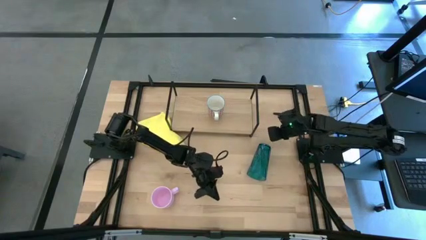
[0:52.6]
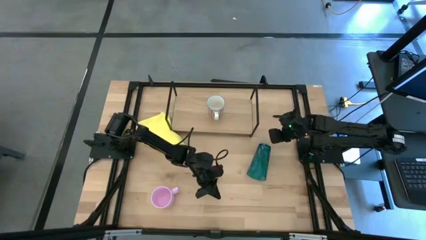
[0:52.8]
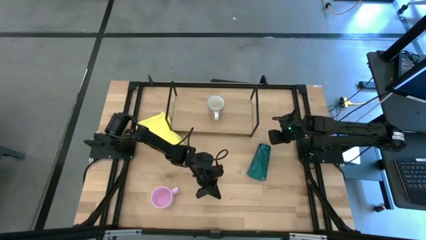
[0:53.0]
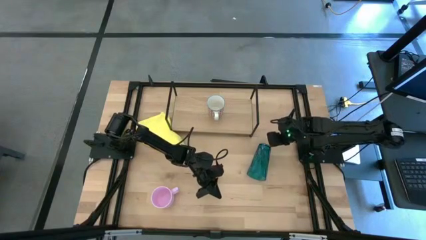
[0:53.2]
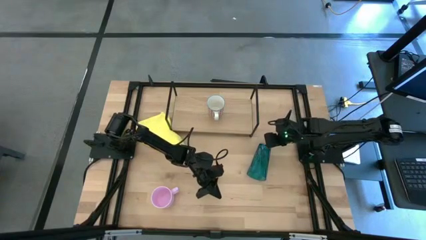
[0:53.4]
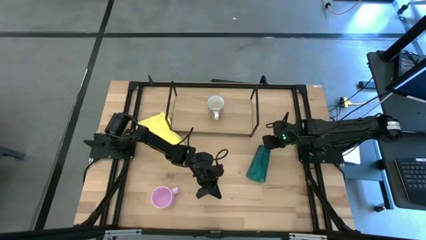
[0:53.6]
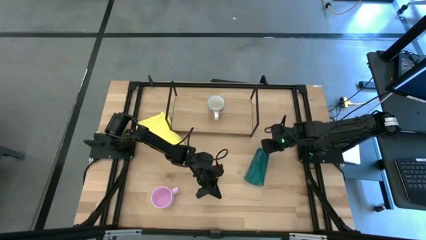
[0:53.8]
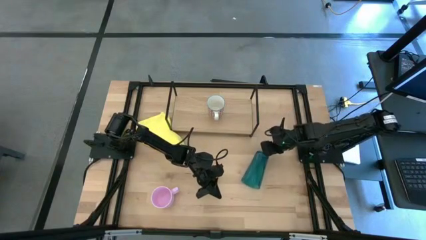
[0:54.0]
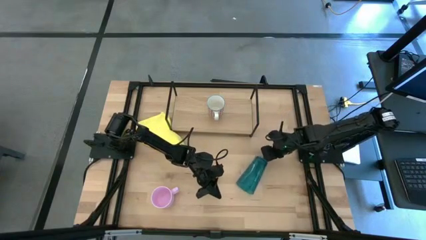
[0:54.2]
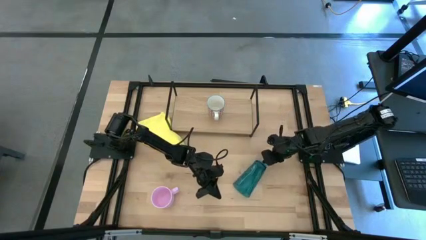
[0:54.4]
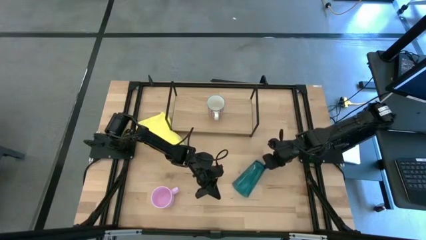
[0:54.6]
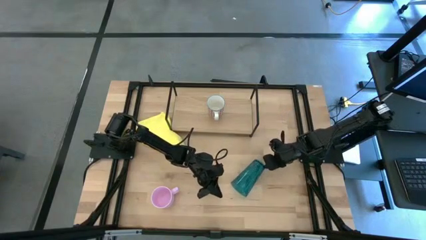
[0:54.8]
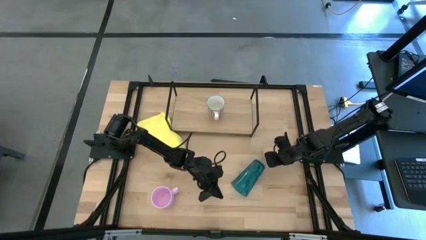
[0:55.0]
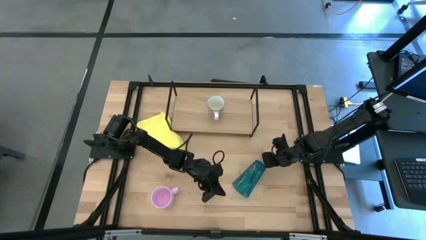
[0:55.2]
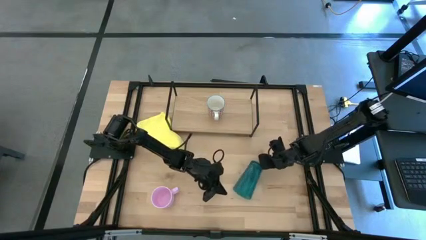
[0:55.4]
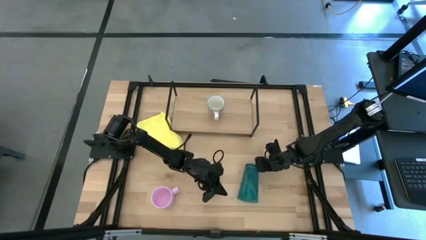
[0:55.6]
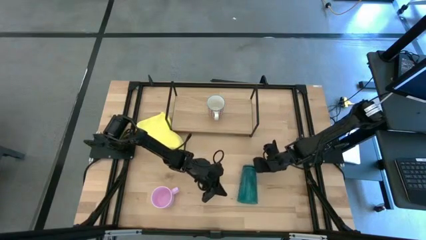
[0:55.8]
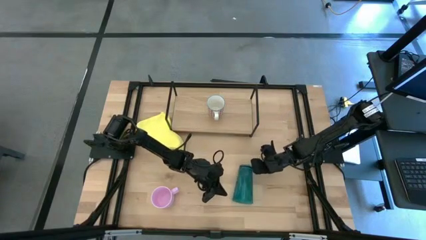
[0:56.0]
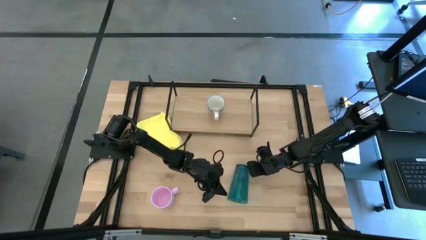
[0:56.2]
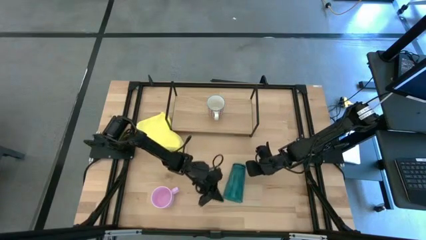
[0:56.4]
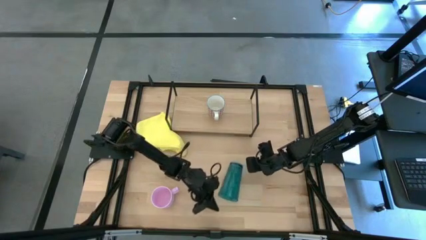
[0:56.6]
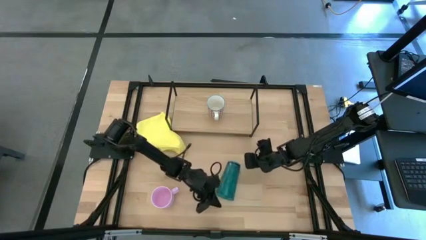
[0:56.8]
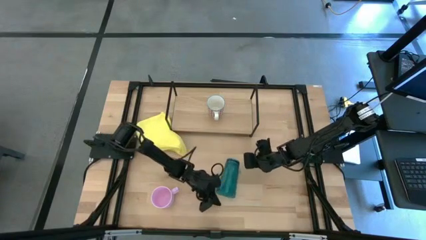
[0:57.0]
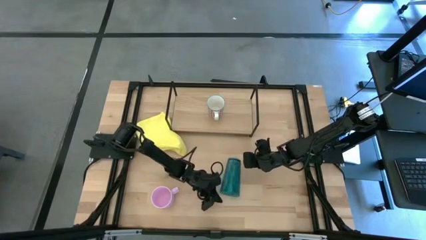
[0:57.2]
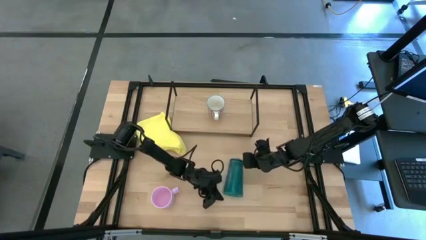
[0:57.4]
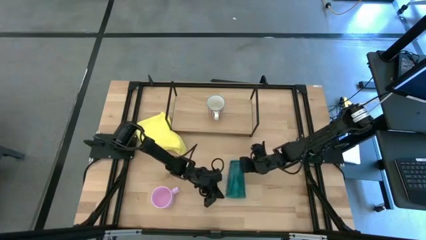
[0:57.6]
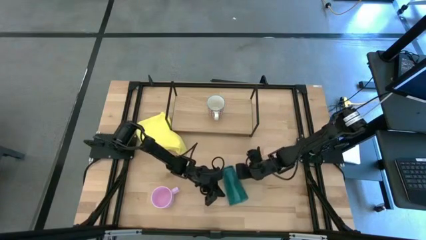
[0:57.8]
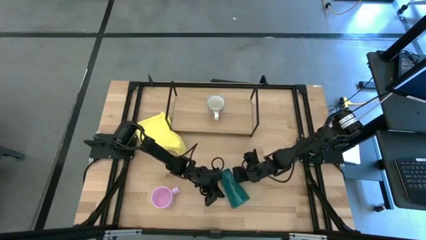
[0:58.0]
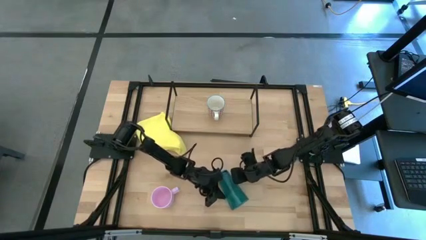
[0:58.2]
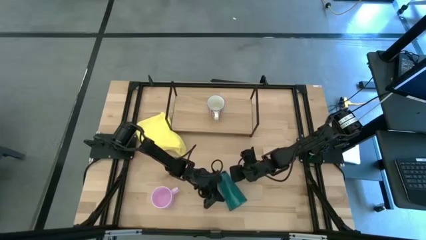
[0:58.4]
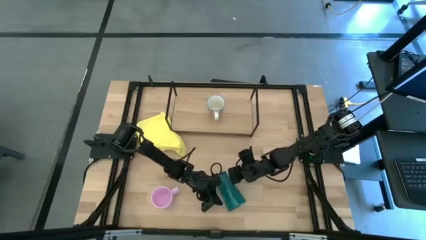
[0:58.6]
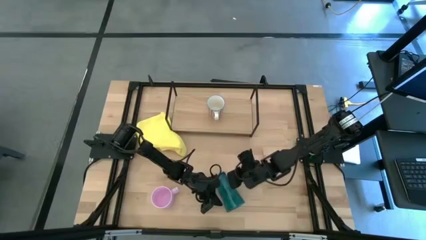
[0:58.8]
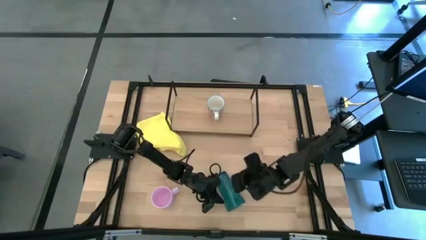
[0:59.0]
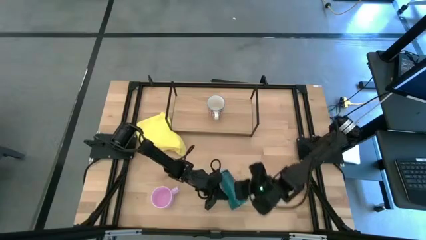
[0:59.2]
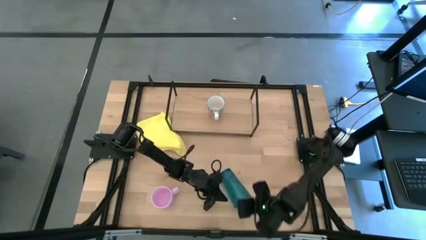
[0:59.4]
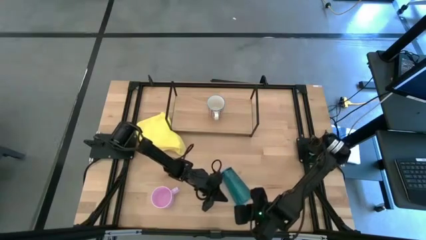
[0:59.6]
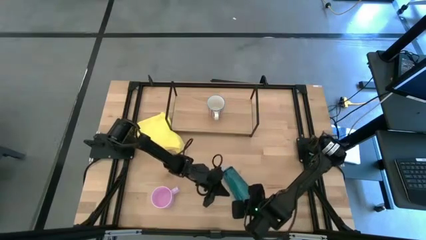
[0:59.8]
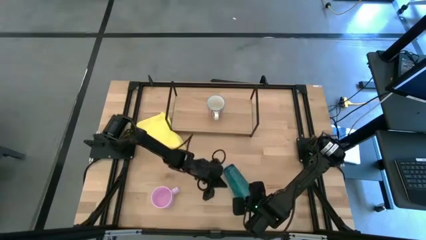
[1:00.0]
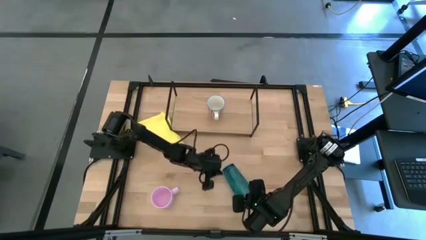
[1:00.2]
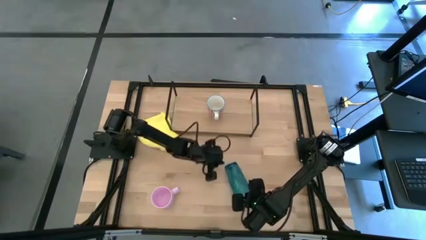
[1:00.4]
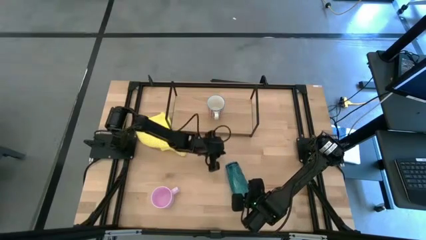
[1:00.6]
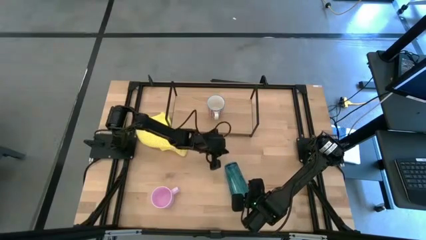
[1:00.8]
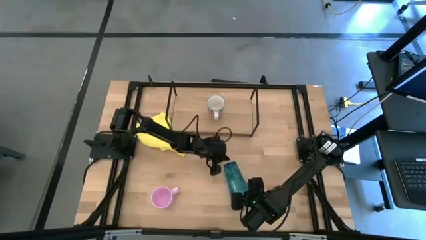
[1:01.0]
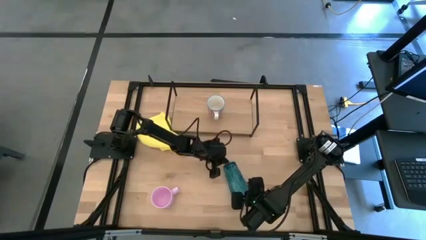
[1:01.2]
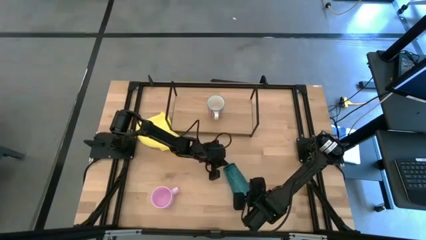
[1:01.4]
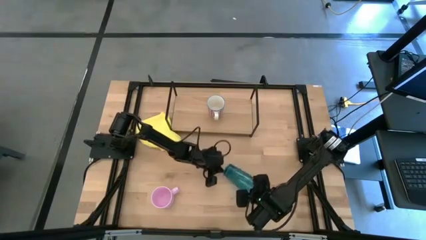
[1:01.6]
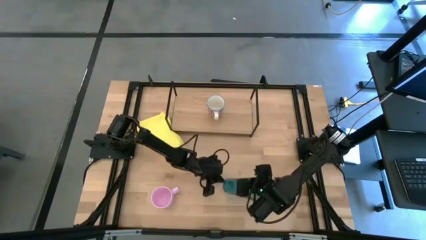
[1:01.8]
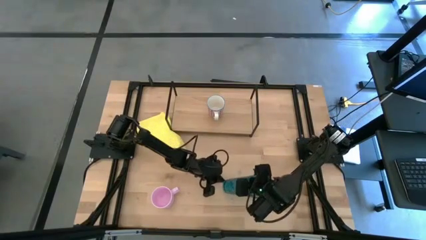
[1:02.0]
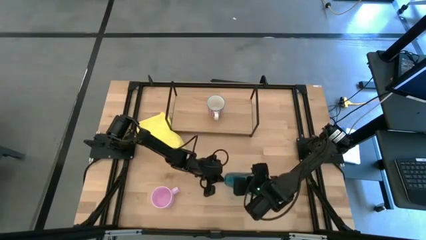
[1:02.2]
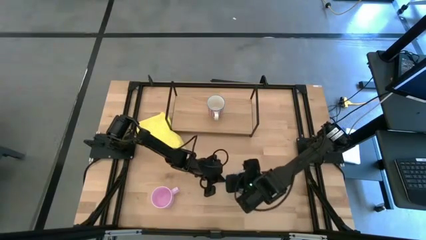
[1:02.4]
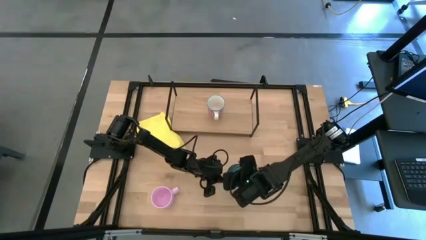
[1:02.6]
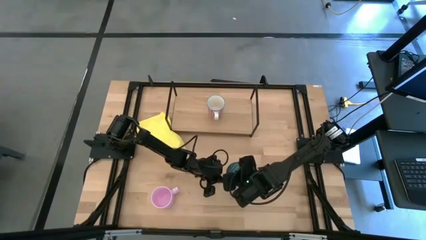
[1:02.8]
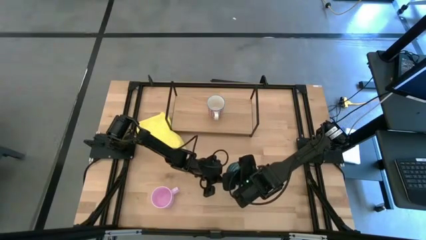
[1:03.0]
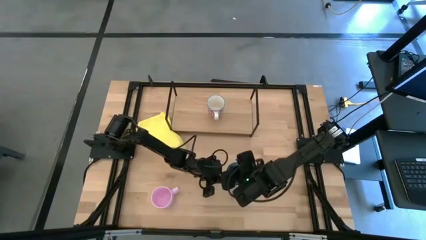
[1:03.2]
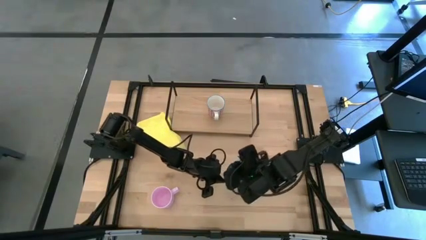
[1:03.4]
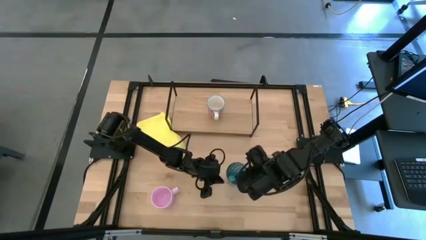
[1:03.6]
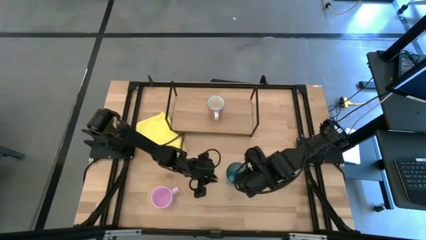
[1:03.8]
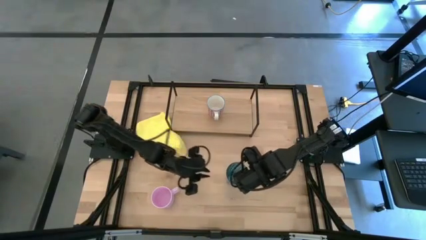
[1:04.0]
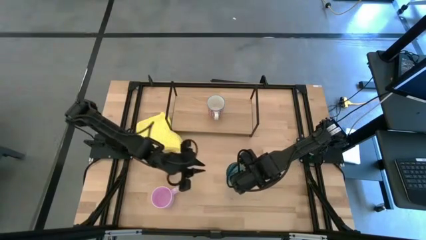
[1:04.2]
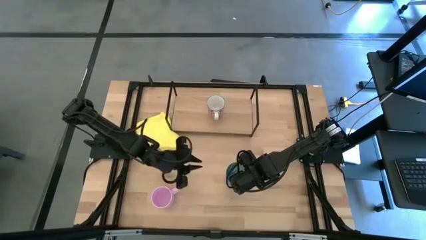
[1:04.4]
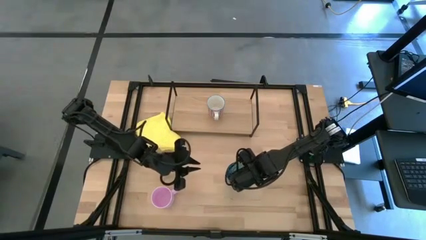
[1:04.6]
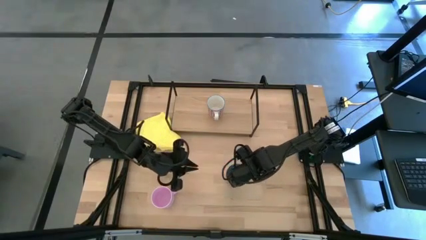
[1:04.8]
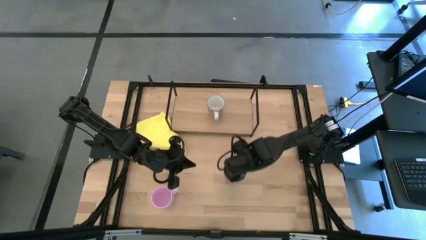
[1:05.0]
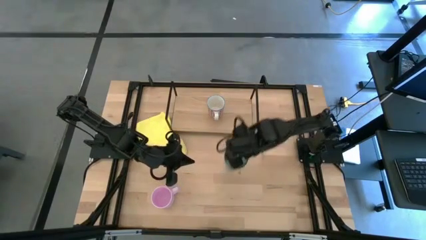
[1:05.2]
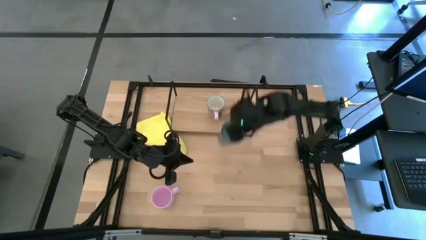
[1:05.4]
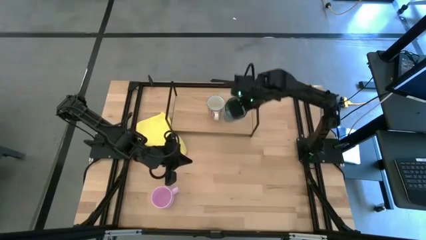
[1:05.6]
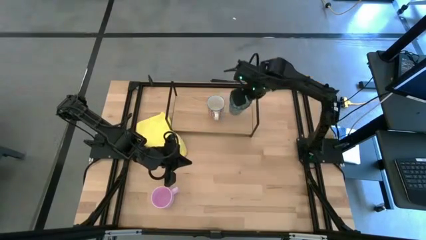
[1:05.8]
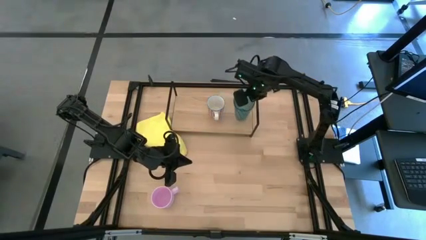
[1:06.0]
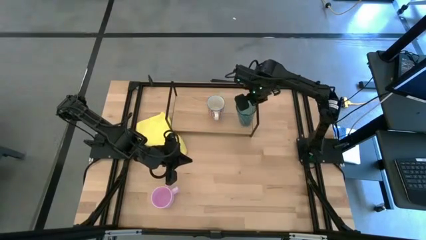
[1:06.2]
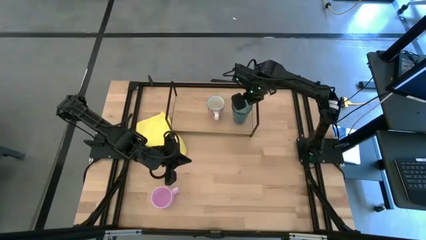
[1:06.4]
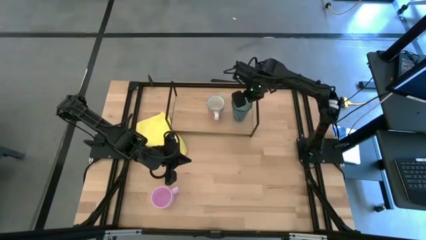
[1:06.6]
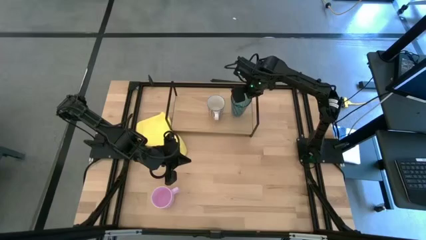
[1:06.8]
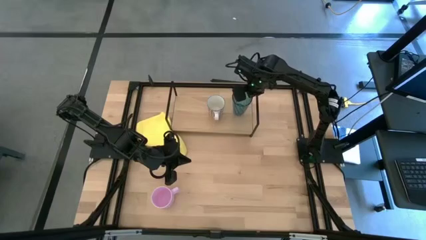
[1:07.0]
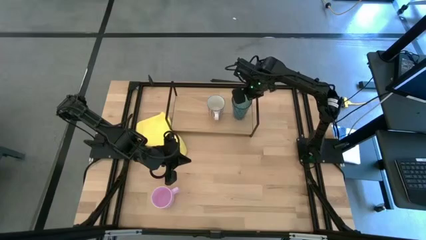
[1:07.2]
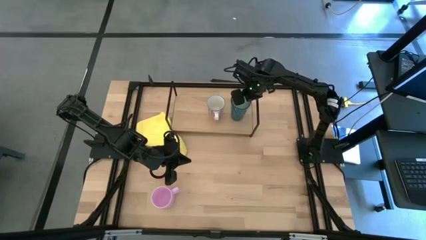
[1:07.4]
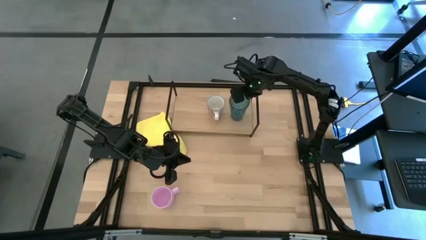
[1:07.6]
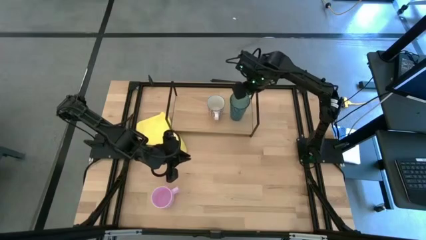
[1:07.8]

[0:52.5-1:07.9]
Task: Stack small to large cups/mugs on shelf
Put the blue cup on the shelf
